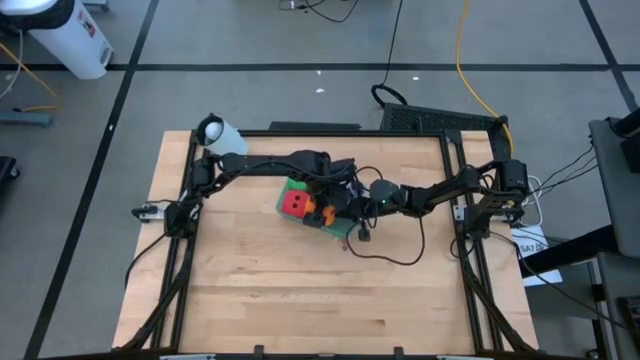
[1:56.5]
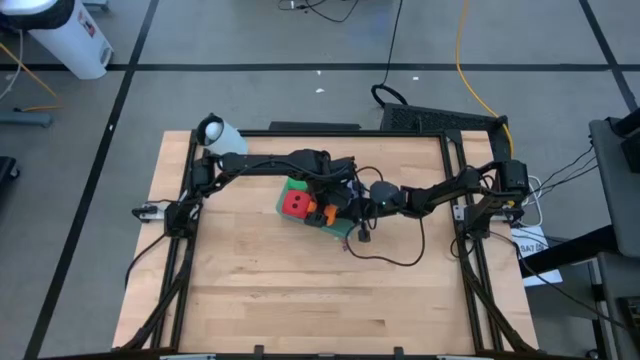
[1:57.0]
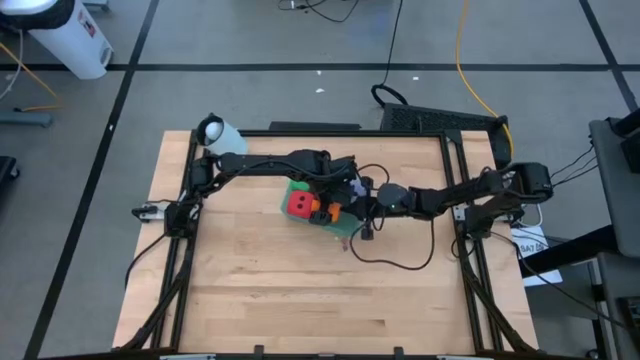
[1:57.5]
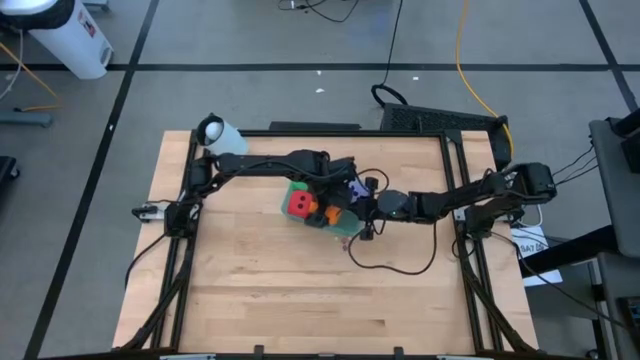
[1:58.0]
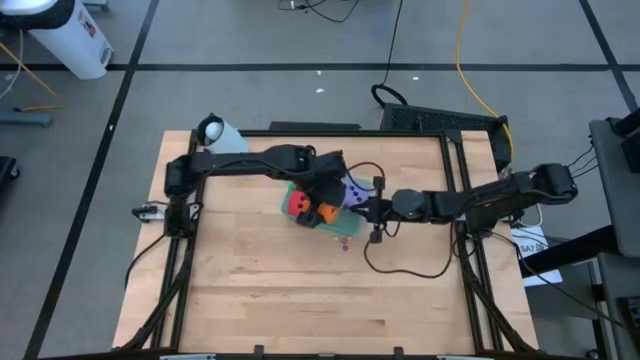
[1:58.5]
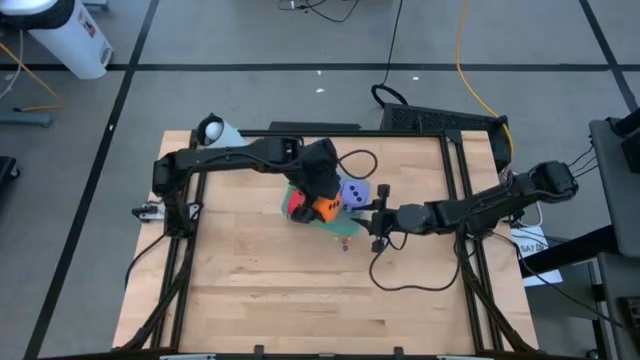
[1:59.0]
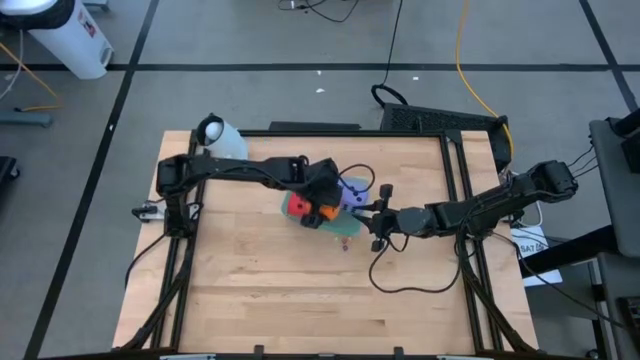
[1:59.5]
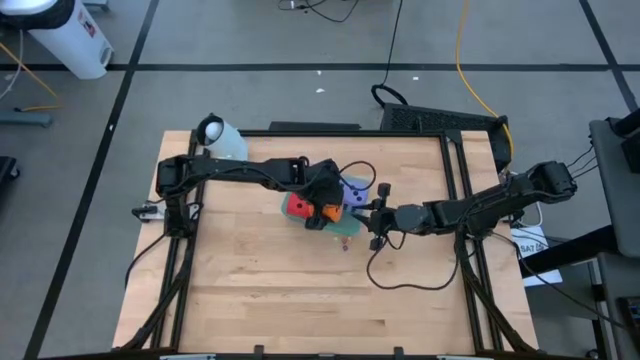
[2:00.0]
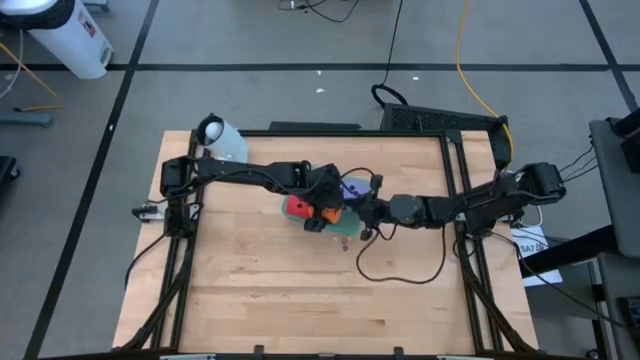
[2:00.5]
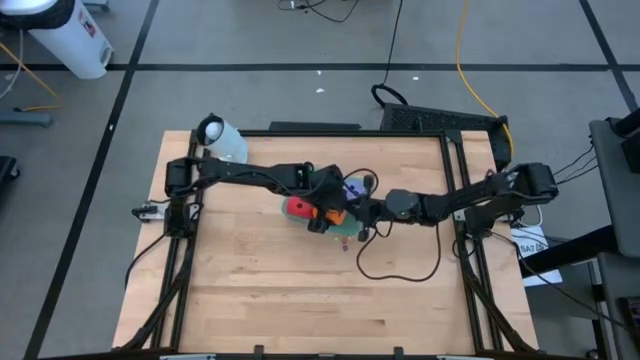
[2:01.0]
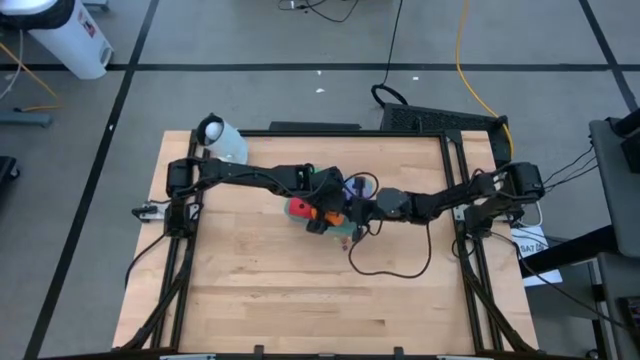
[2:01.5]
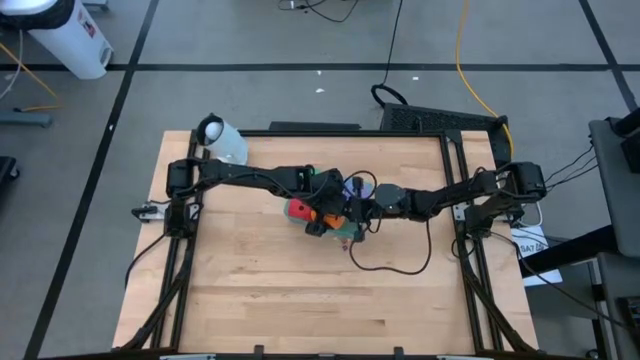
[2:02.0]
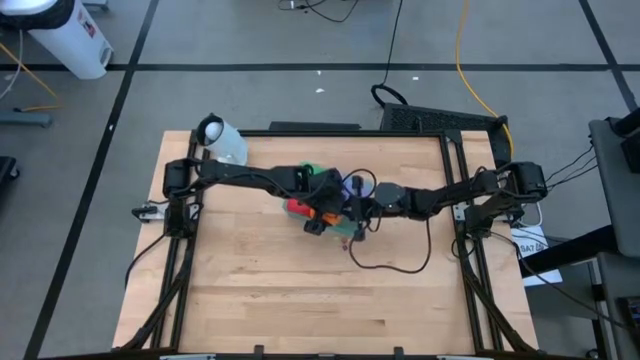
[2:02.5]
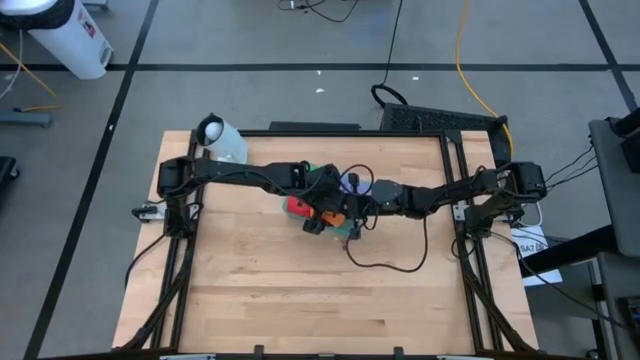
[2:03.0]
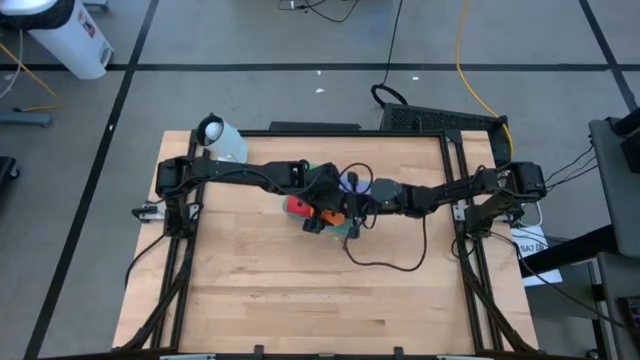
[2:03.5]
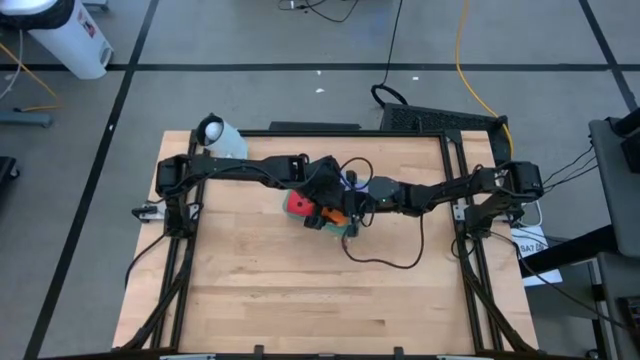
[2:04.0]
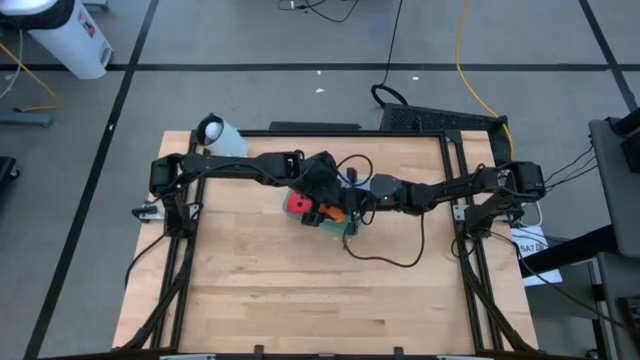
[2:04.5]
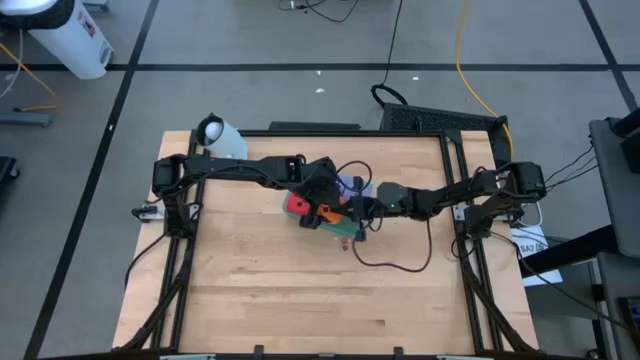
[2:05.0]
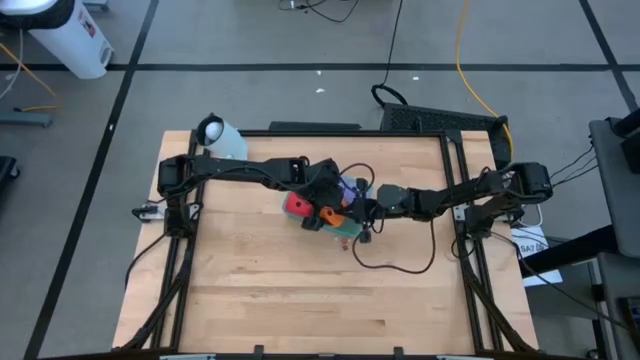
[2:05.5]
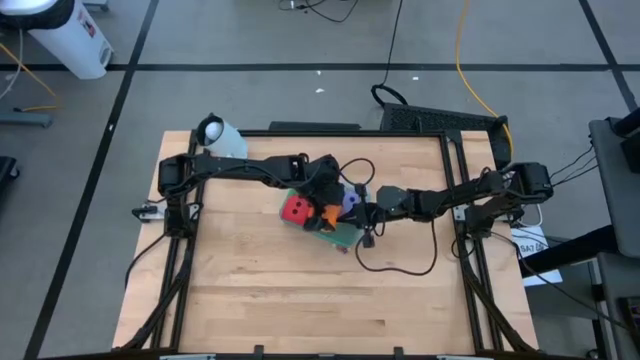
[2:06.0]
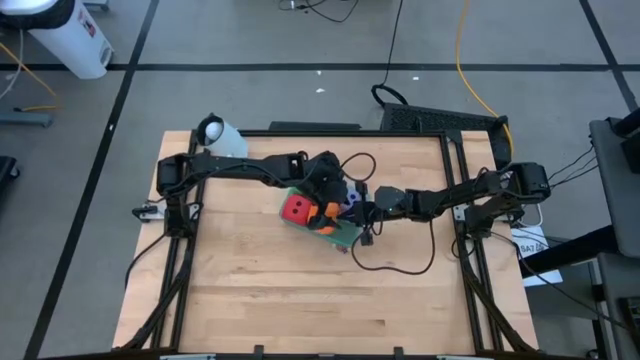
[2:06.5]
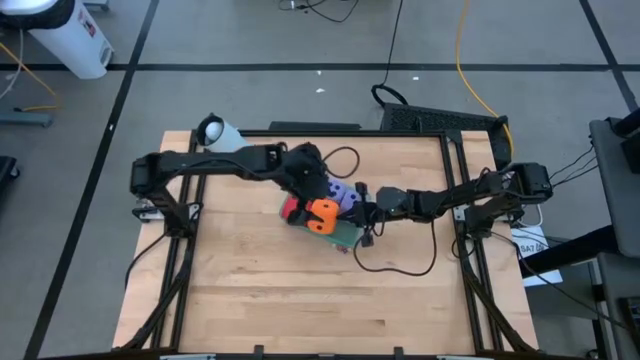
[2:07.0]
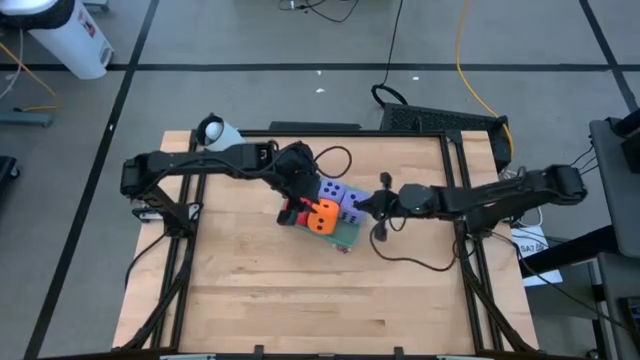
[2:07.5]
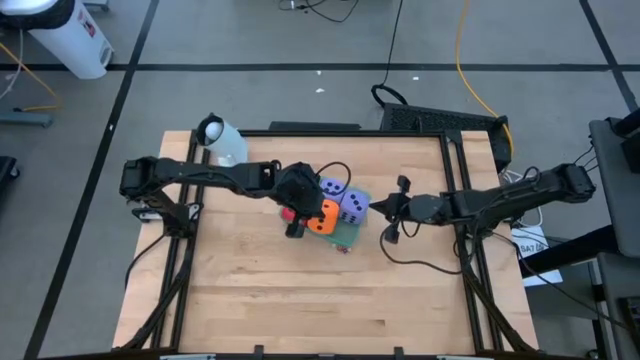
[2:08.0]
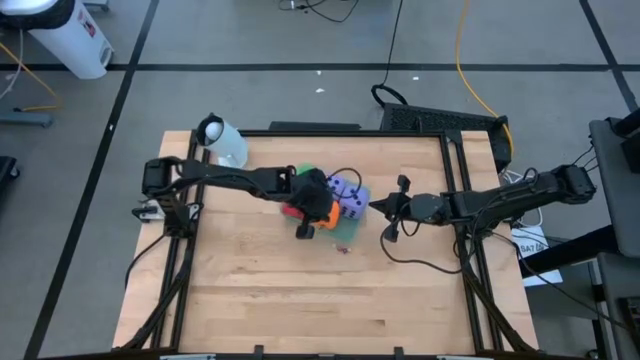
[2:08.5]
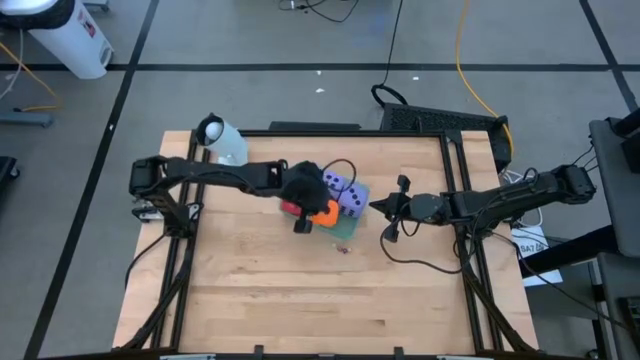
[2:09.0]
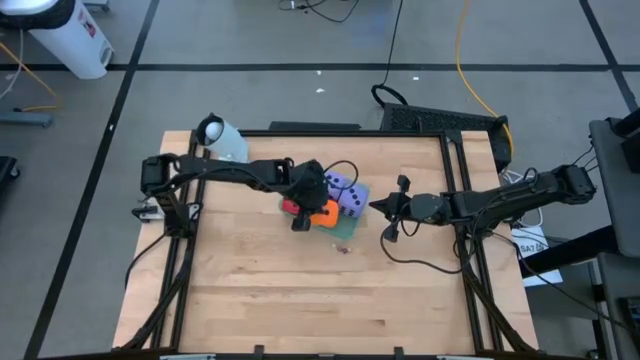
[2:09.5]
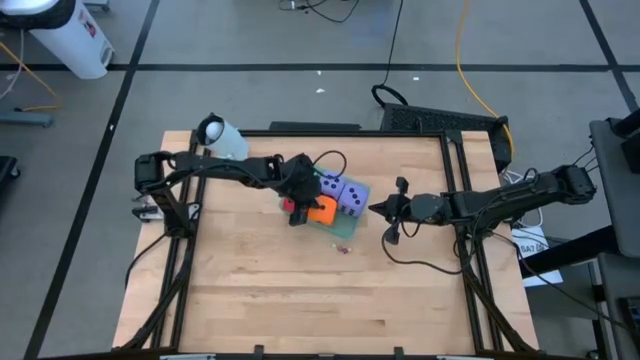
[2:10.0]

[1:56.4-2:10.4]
Task: Pick & Place Dice
Put the large orange dice into the blue bin

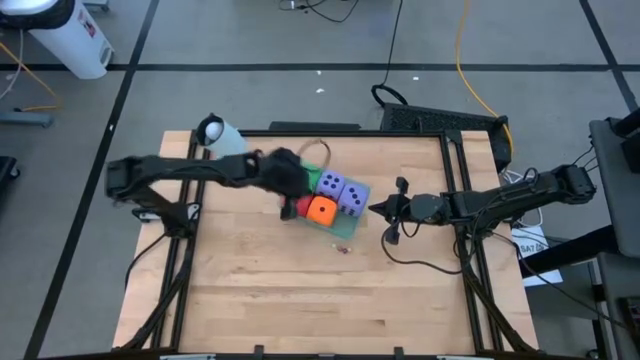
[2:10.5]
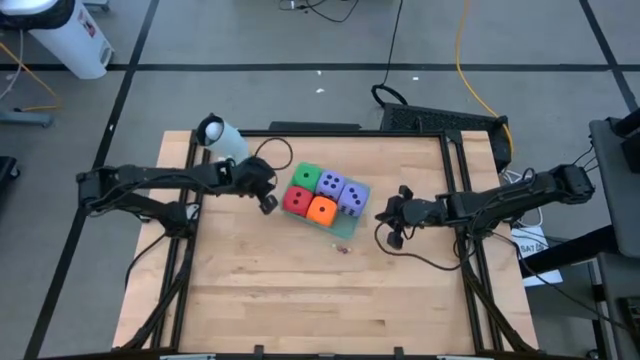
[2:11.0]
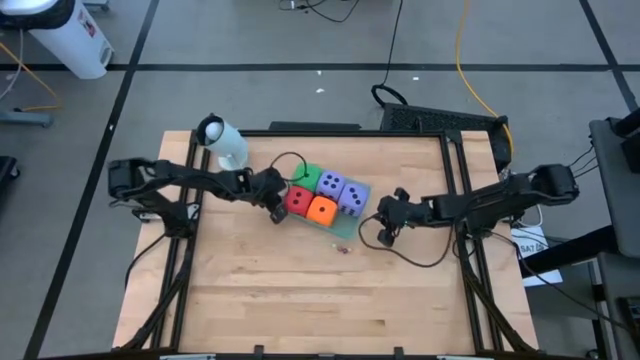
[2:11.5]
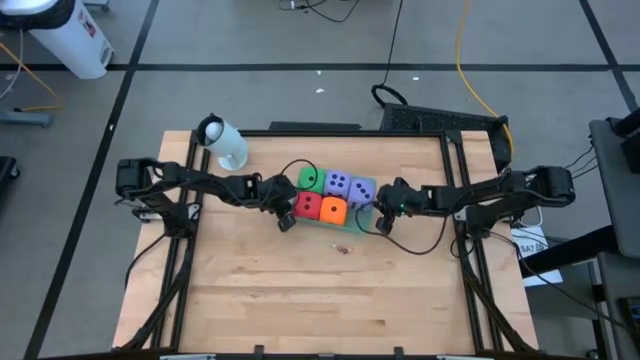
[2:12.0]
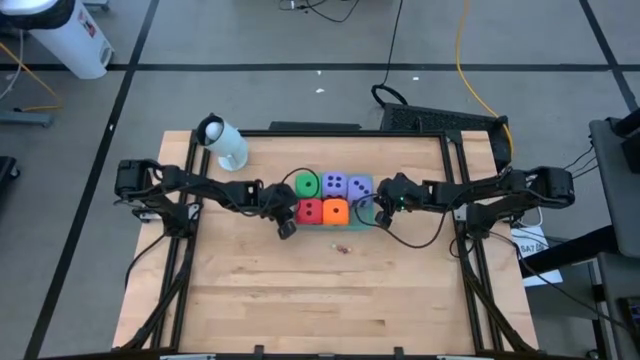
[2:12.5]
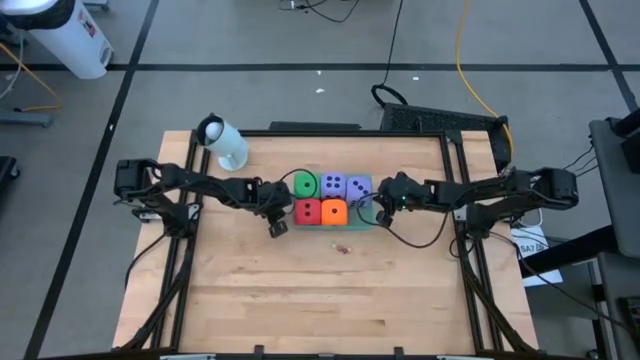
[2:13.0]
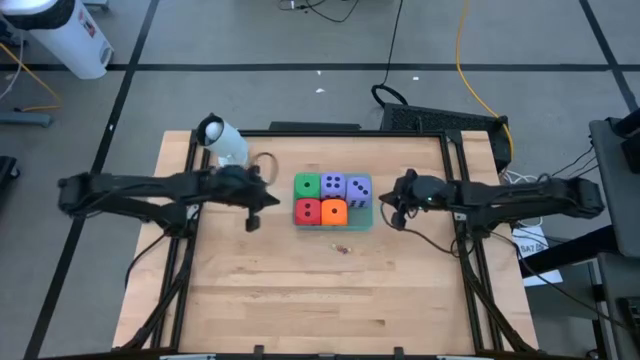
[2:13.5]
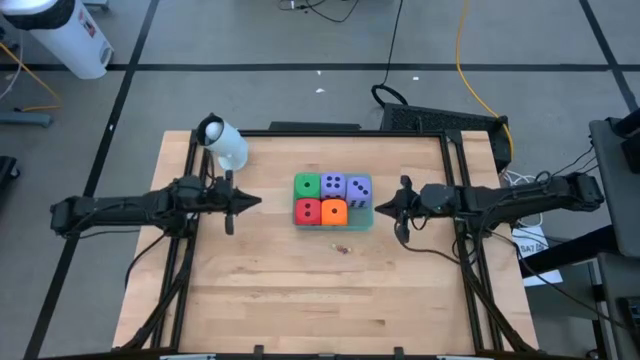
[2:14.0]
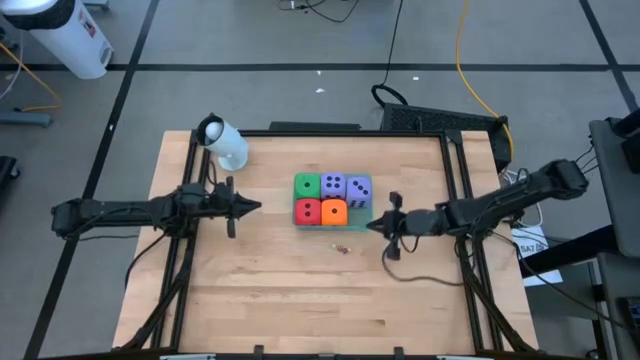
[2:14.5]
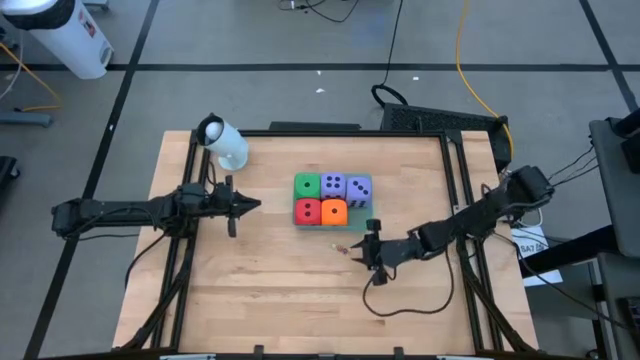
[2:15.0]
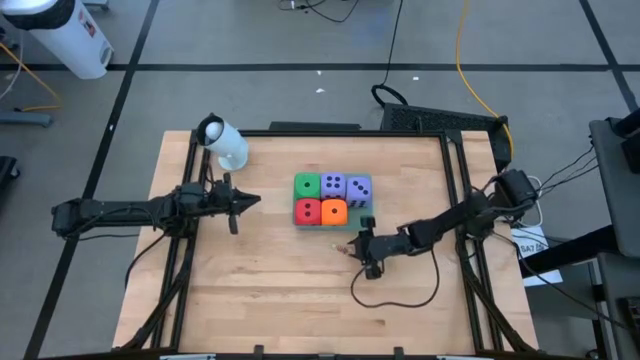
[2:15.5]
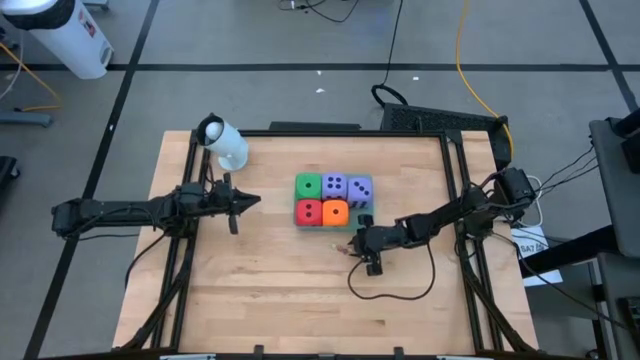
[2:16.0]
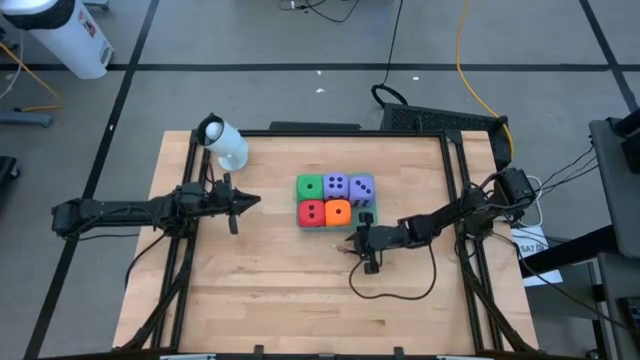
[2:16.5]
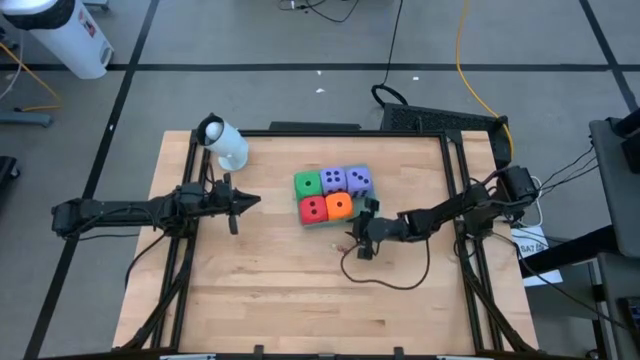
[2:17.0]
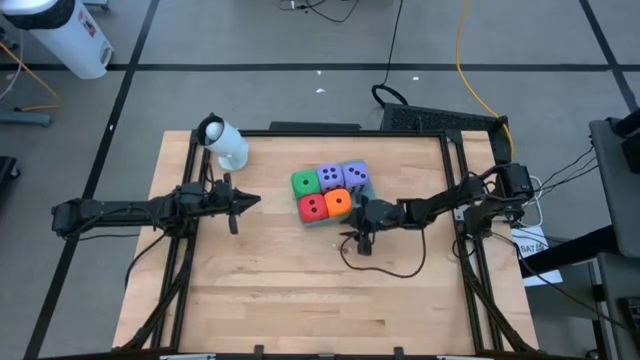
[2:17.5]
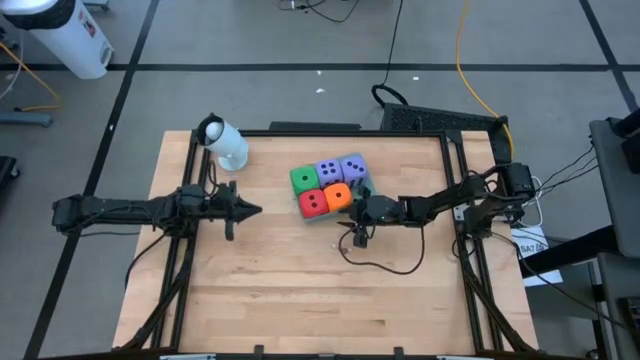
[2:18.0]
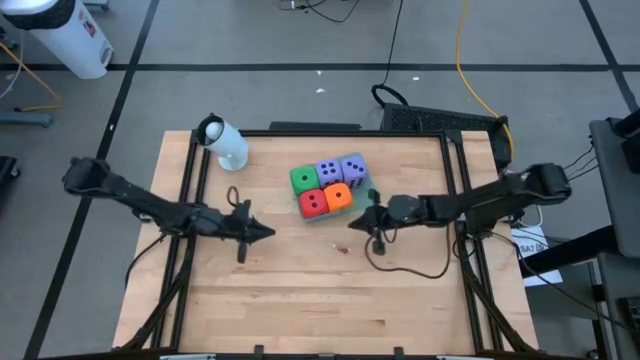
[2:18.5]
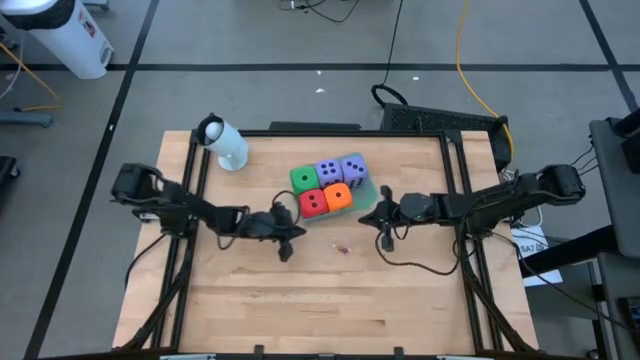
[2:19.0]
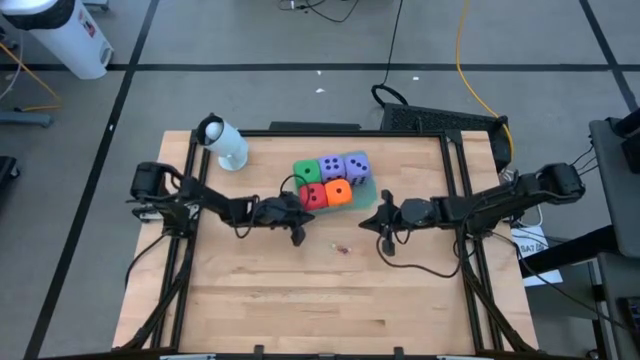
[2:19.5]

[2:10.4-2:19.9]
Adjust the blue bin
